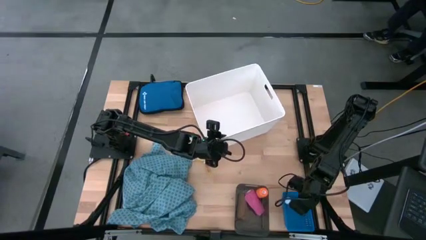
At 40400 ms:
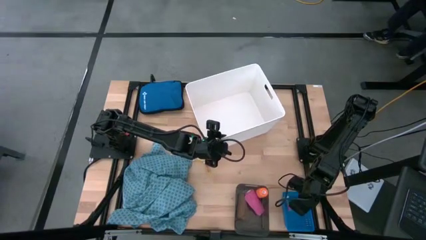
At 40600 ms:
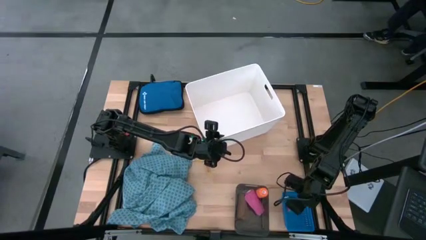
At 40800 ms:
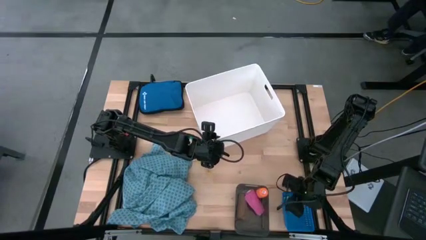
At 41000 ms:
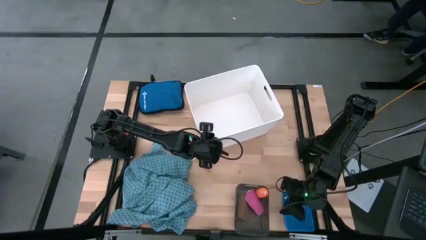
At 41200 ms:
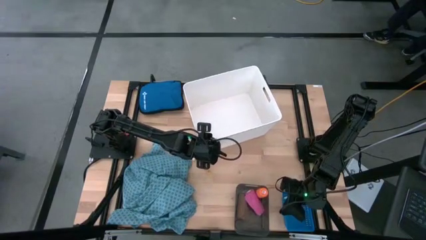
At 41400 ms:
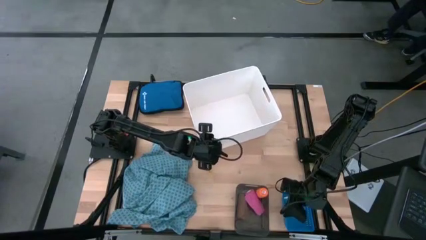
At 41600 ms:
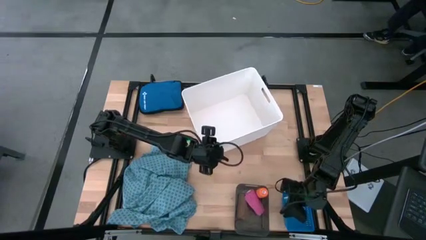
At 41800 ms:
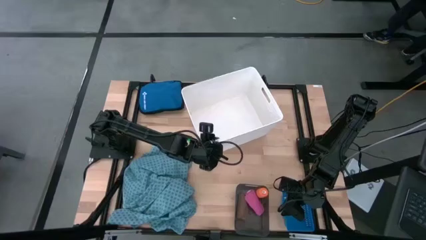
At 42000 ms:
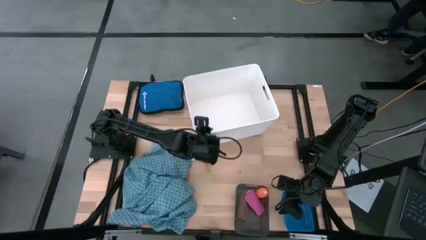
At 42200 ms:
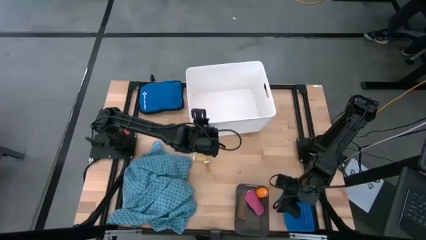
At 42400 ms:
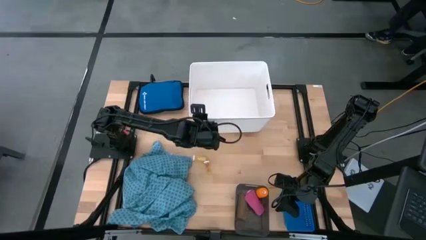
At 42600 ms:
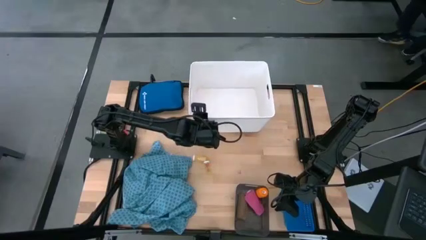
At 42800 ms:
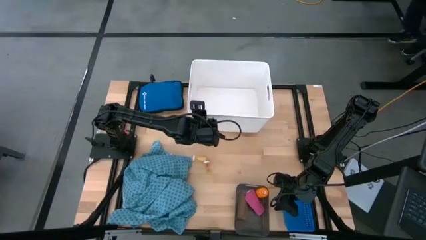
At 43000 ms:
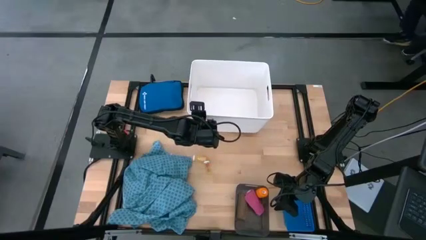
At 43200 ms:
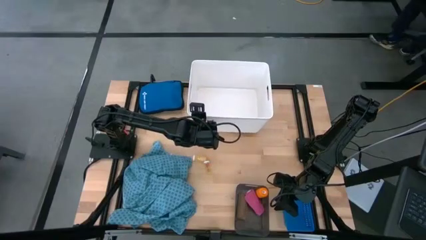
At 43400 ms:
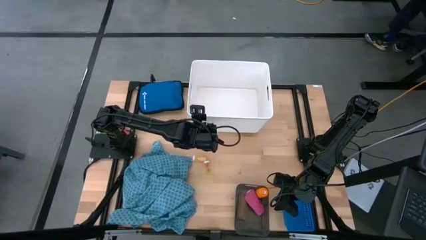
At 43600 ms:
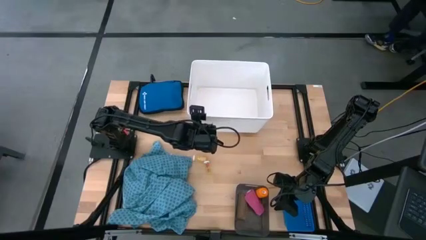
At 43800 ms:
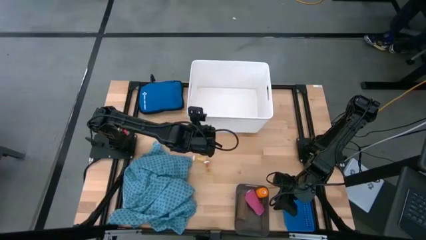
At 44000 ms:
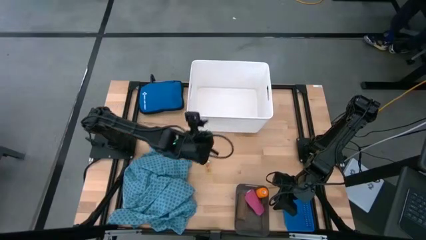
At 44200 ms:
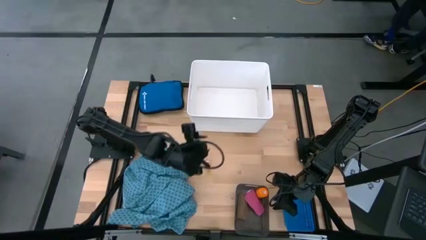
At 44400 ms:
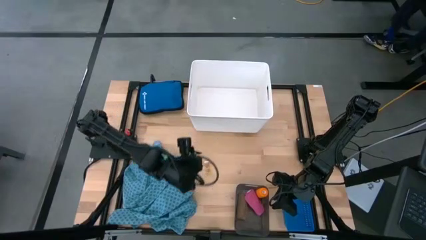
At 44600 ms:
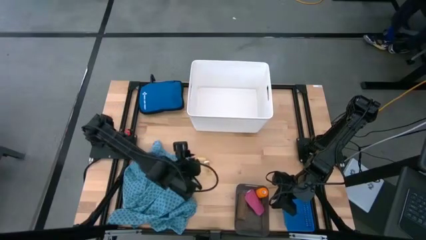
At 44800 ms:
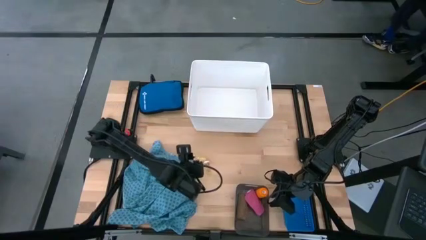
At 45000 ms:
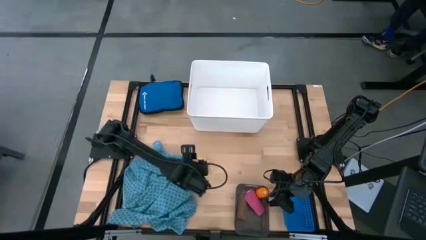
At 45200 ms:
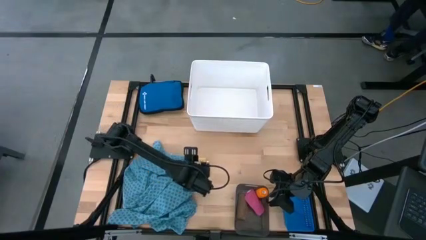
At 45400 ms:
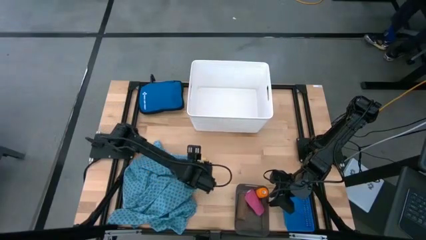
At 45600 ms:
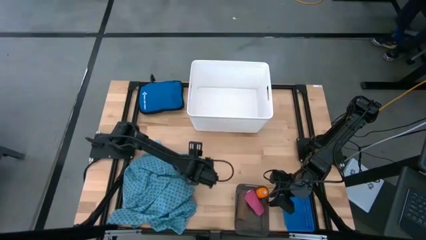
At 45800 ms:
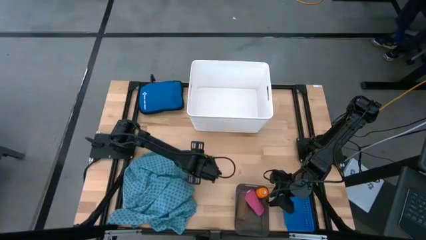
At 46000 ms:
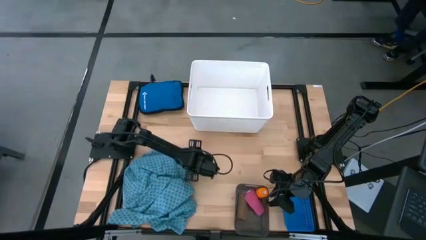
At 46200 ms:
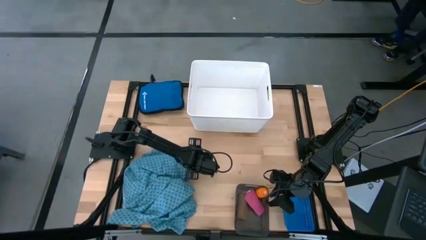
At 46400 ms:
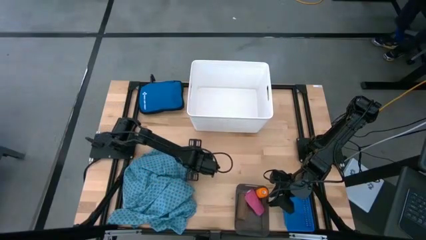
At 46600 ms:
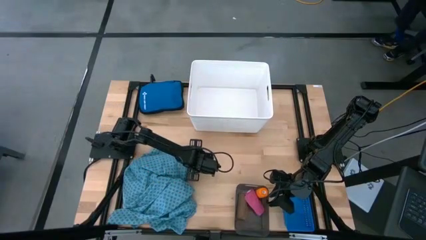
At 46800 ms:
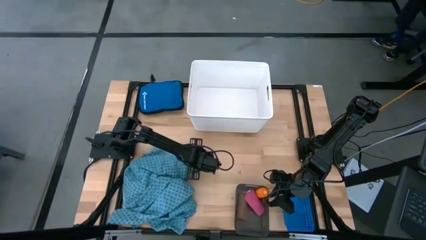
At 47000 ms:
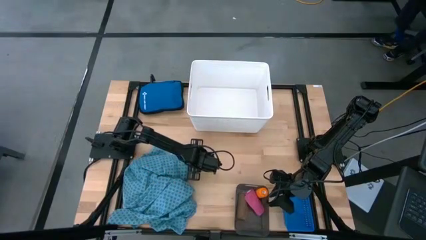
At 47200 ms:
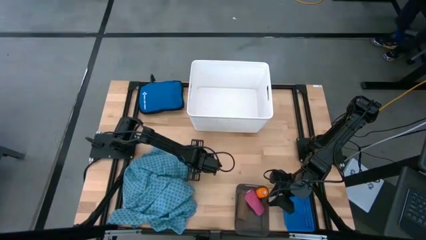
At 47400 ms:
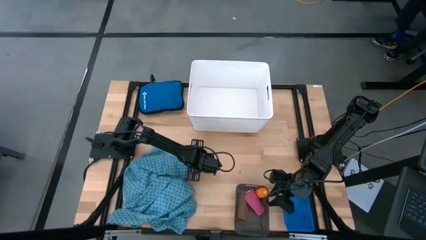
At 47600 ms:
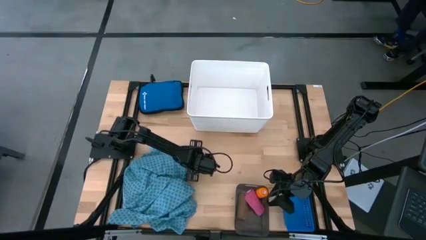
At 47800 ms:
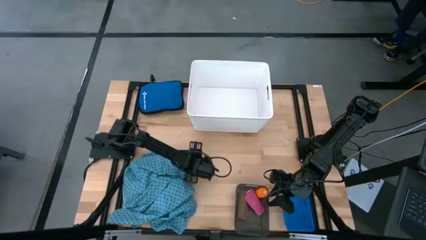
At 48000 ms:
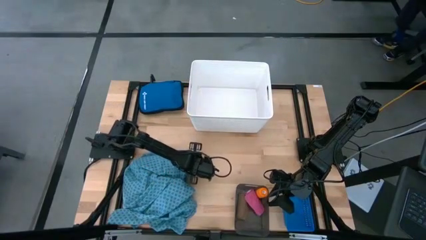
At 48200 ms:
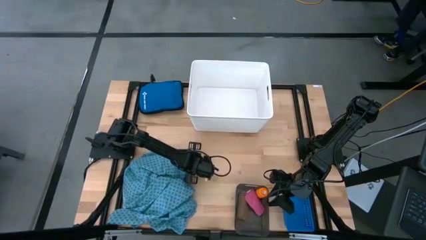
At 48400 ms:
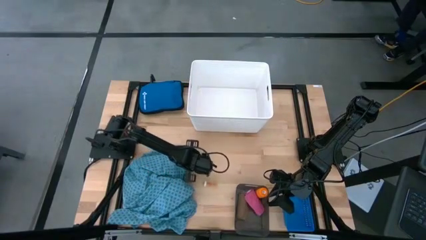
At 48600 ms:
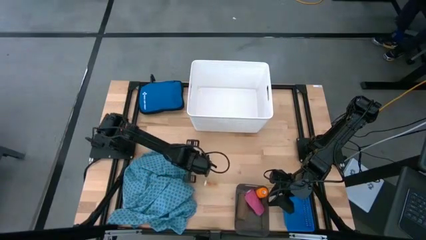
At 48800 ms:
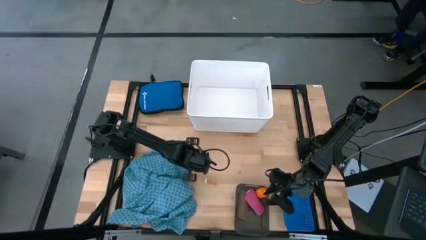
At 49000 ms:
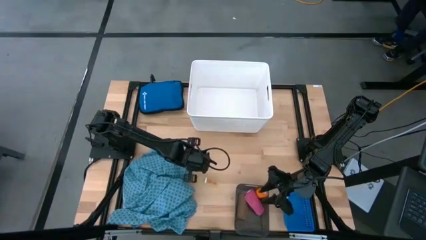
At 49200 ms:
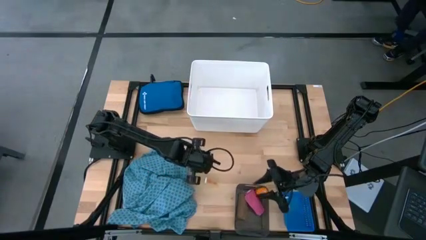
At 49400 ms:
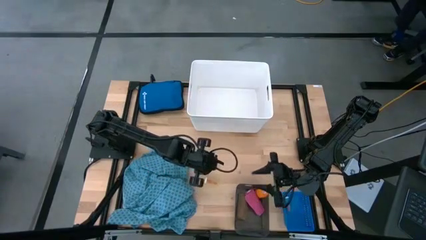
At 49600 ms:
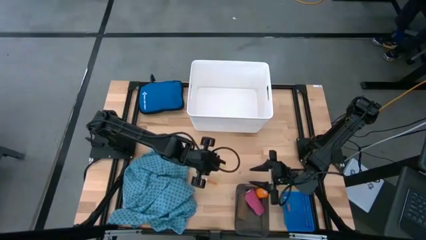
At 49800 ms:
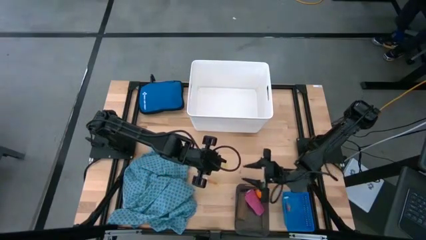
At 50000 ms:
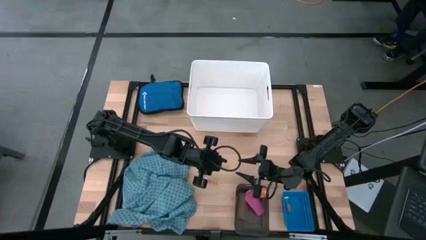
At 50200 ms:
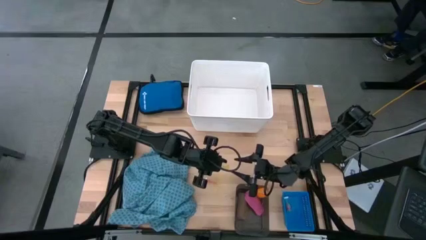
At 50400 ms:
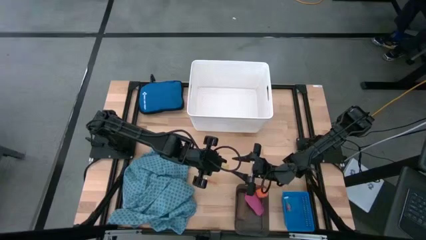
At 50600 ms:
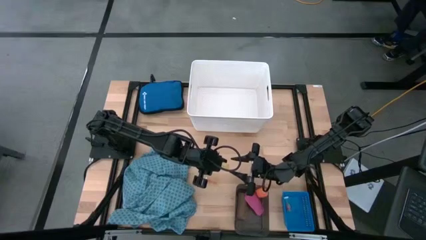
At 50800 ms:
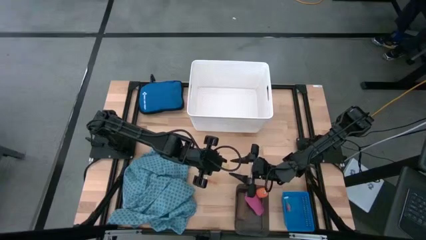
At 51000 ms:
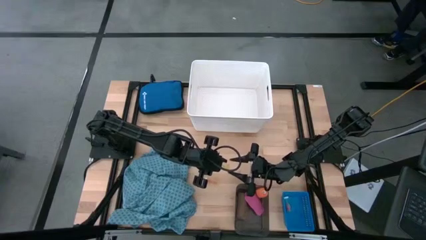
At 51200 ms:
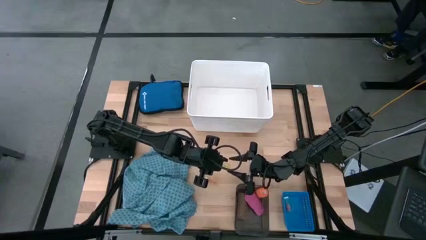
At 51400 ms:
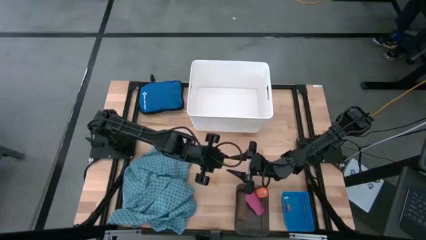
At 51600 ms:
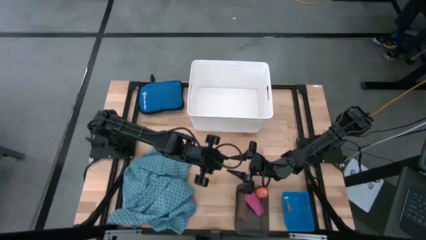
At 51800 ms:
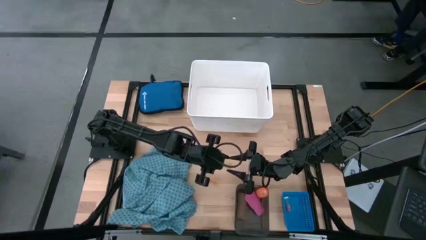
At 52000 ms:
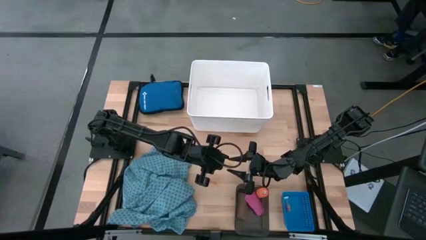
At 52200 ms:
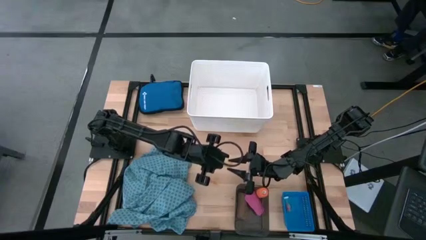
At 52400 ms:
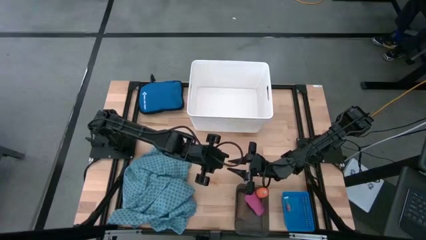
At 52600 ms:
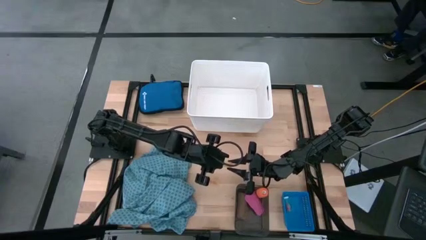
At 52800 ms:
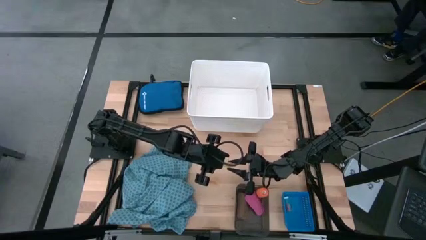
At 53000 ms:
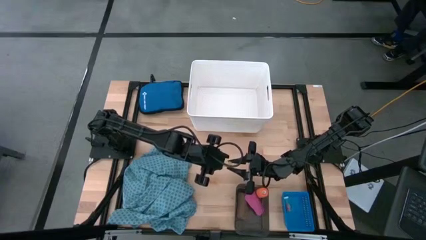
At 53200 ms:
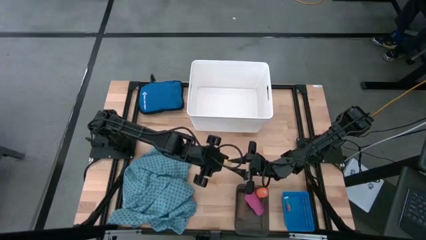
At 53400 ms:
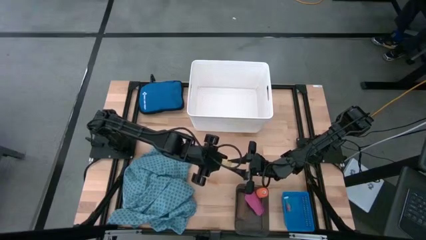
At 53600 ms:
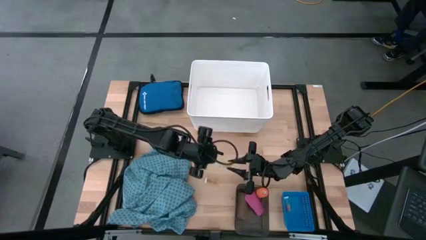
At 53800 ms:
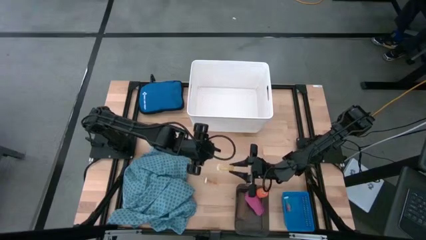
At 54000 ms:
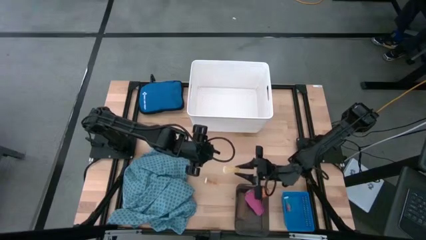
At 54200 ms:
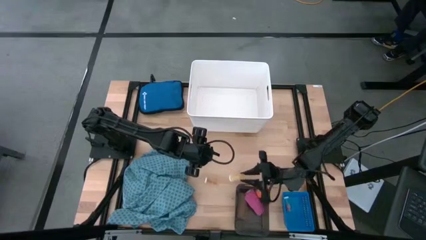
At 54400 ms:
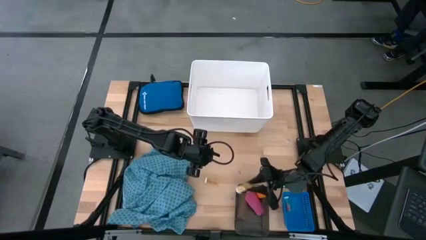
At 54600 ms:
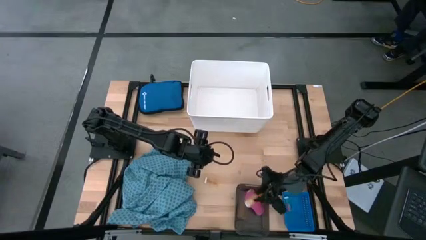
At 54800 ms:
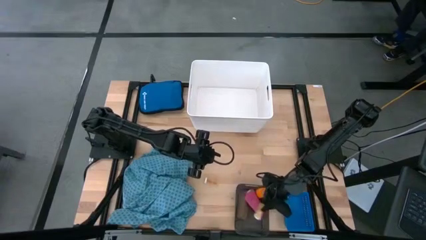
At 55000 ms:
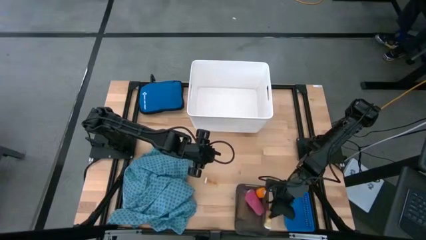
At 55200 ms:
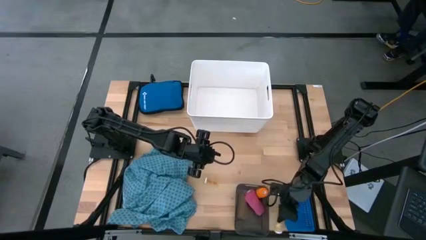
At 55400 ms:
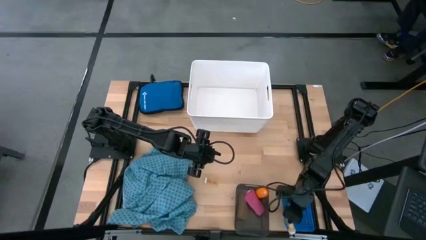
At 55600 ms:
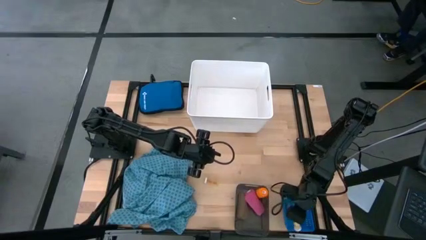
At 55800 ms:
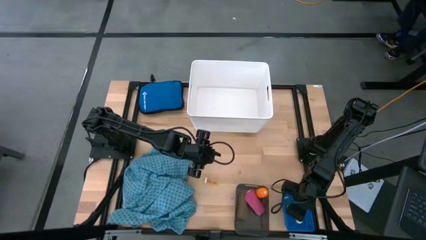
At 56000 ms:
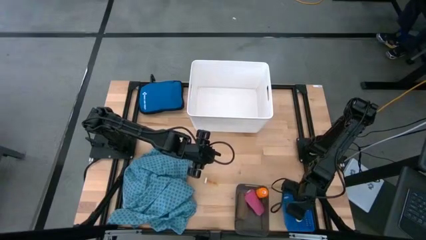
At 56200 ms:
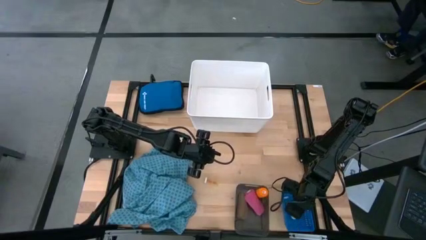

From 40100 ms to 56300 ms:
Task: Pick & place medical supplies in basket/bin
Put the top yellow pill bottle into the blue bin
